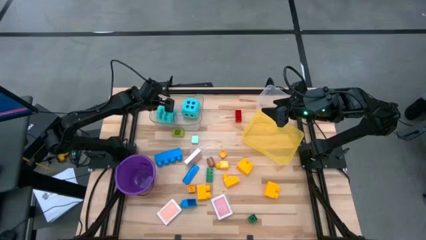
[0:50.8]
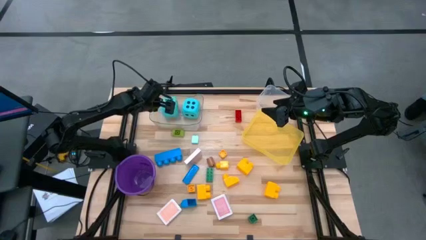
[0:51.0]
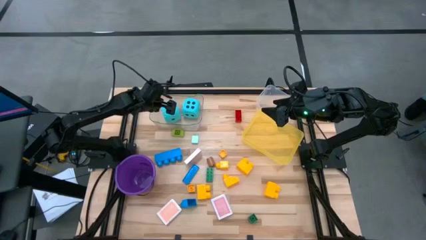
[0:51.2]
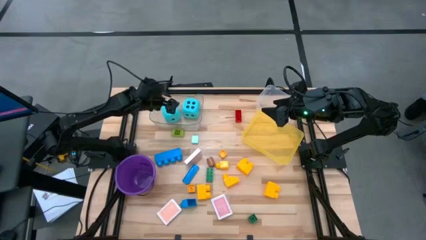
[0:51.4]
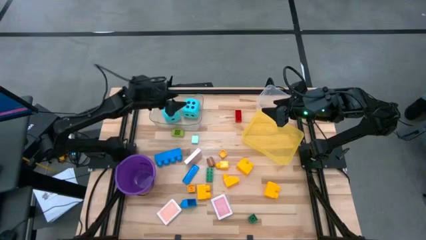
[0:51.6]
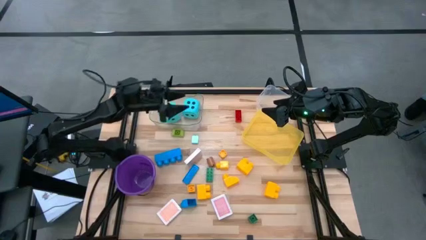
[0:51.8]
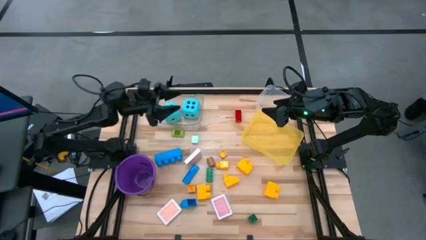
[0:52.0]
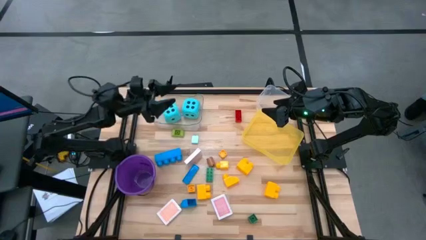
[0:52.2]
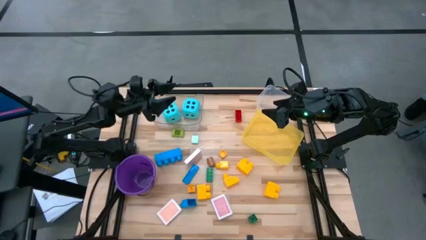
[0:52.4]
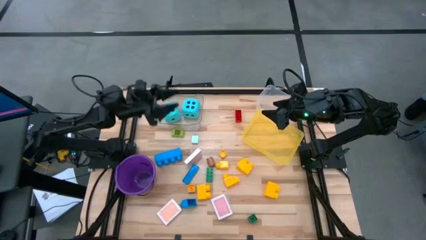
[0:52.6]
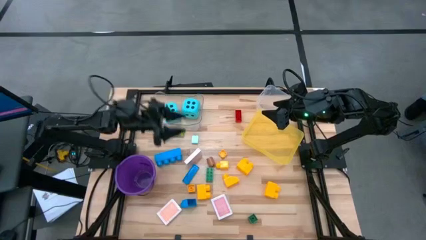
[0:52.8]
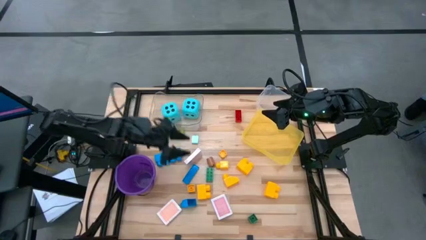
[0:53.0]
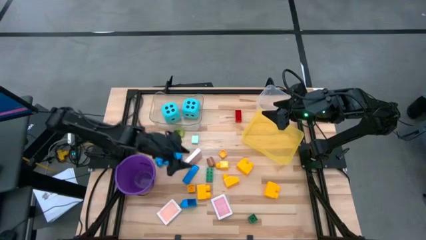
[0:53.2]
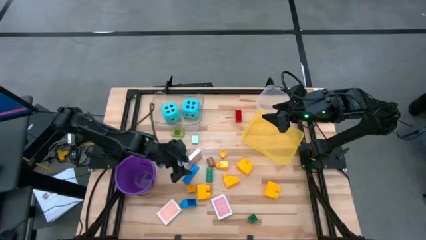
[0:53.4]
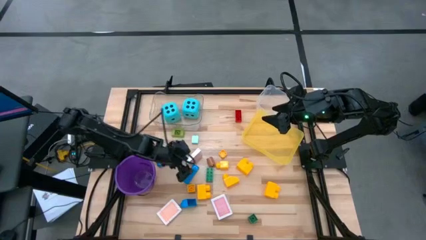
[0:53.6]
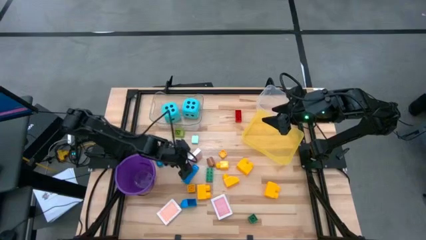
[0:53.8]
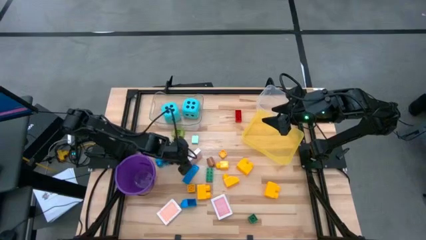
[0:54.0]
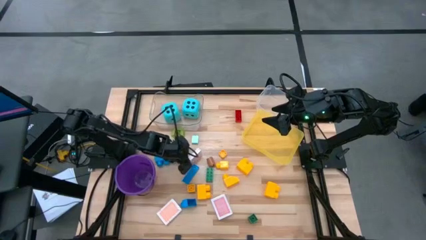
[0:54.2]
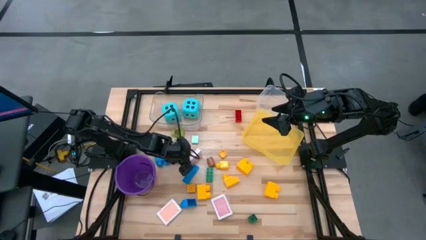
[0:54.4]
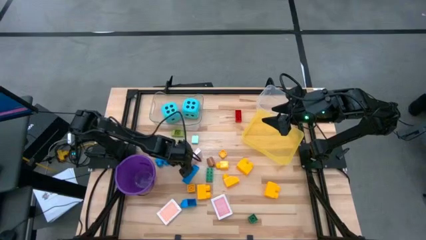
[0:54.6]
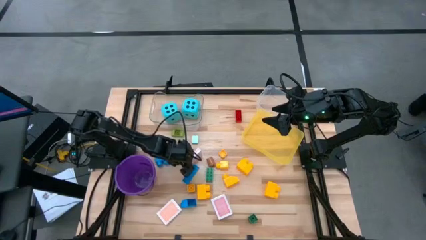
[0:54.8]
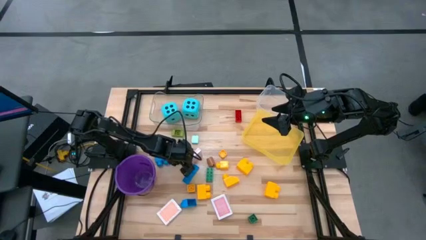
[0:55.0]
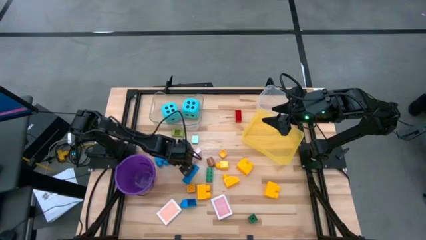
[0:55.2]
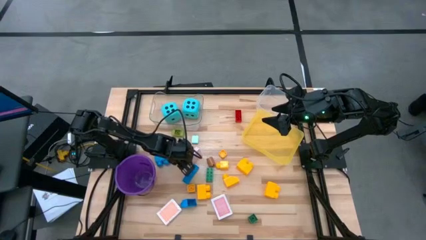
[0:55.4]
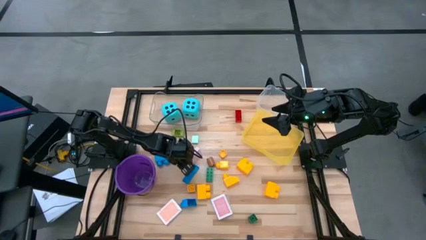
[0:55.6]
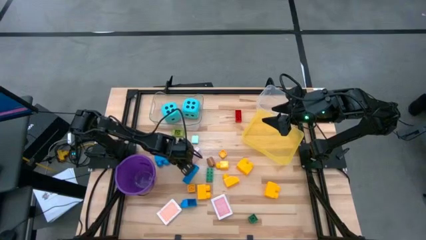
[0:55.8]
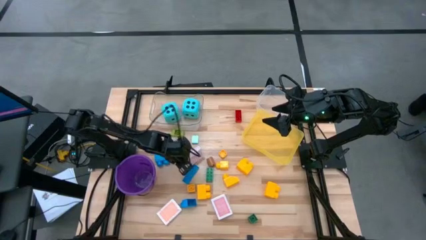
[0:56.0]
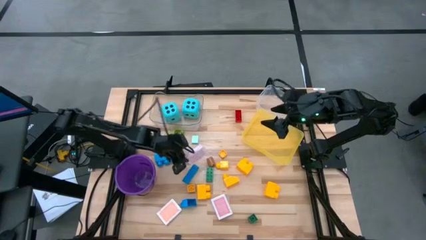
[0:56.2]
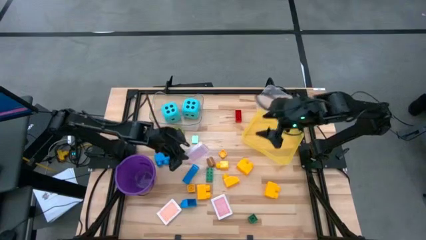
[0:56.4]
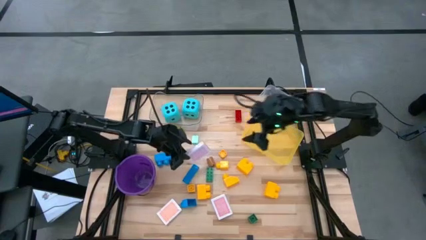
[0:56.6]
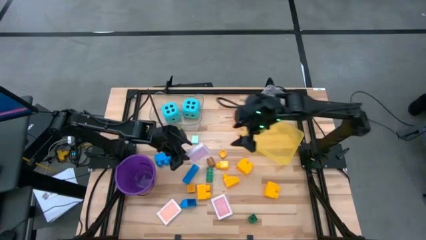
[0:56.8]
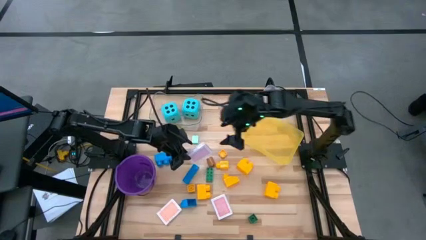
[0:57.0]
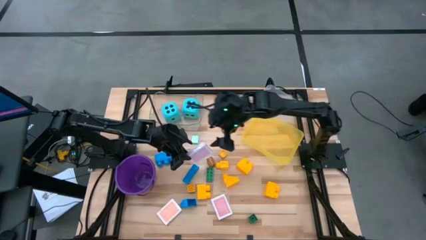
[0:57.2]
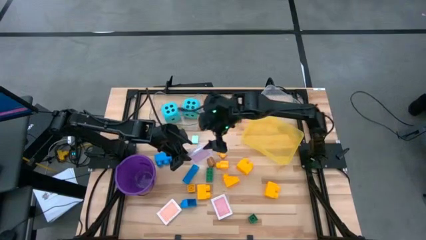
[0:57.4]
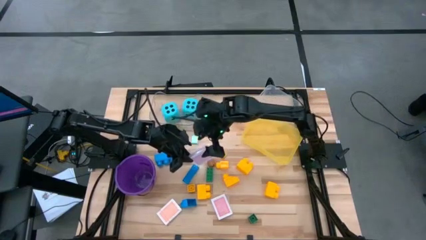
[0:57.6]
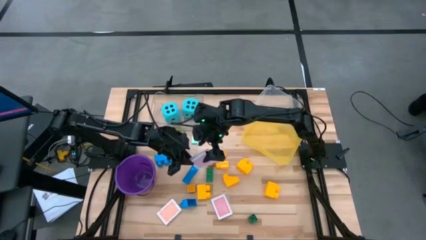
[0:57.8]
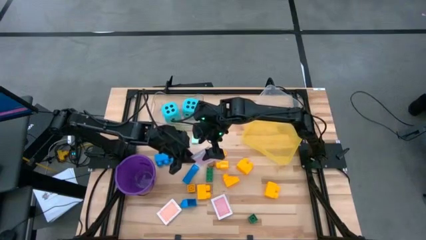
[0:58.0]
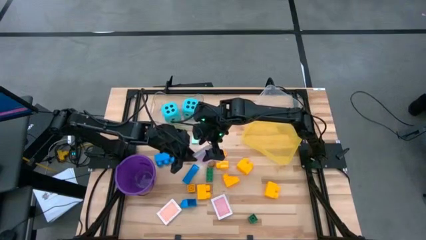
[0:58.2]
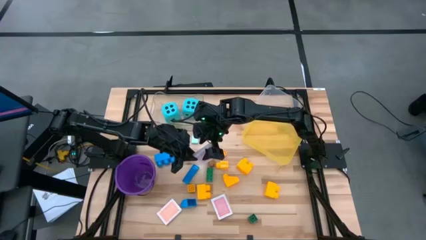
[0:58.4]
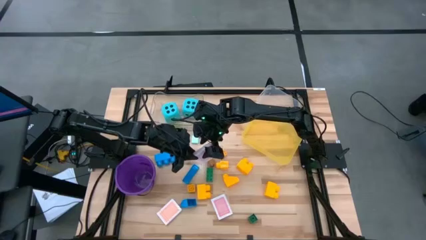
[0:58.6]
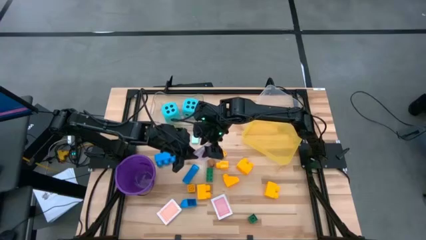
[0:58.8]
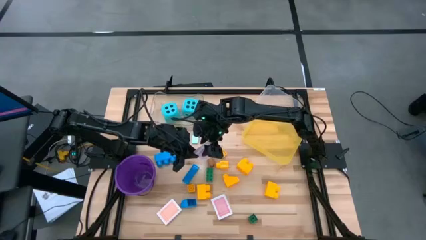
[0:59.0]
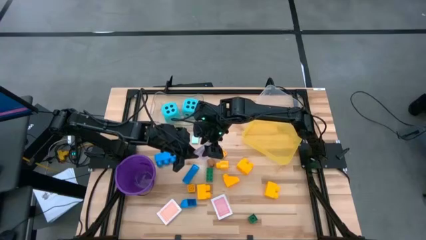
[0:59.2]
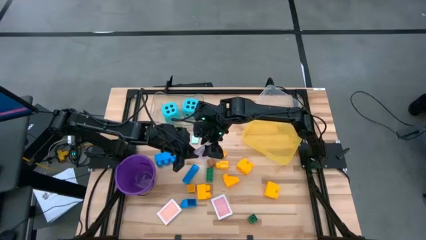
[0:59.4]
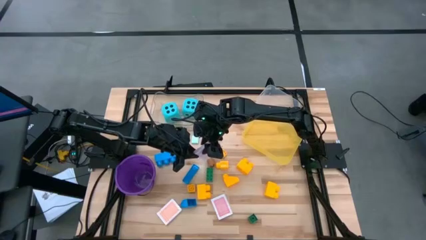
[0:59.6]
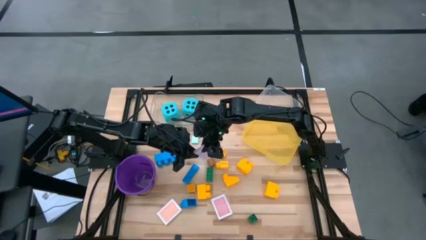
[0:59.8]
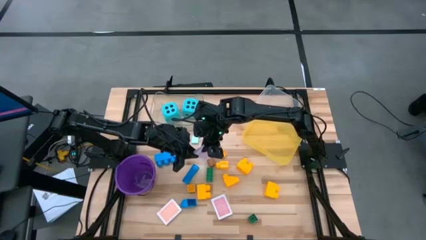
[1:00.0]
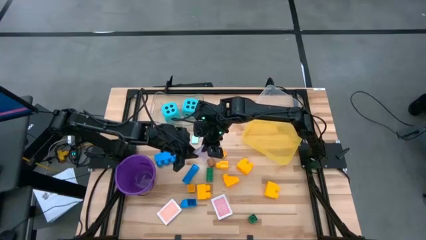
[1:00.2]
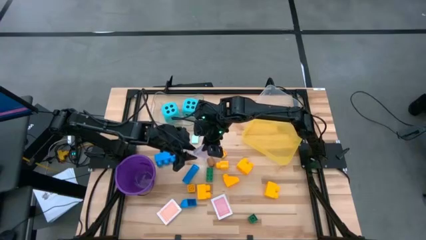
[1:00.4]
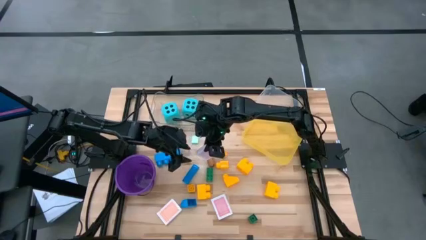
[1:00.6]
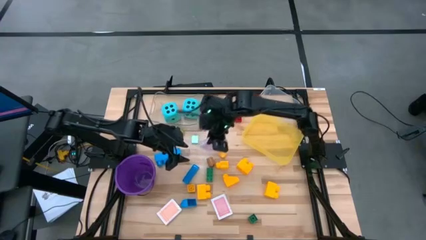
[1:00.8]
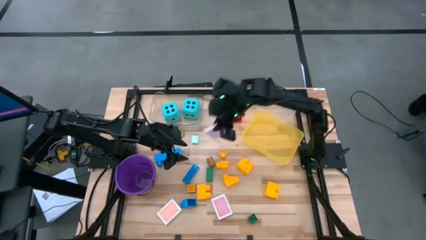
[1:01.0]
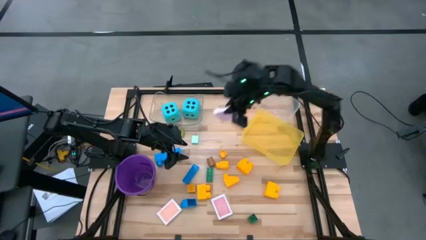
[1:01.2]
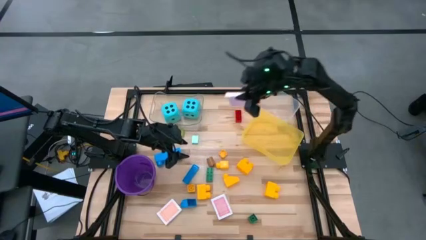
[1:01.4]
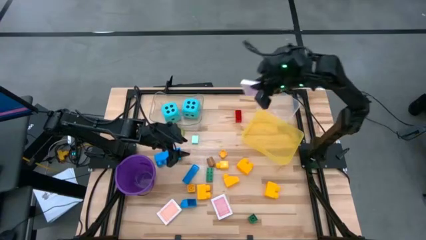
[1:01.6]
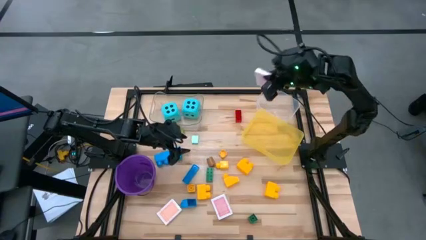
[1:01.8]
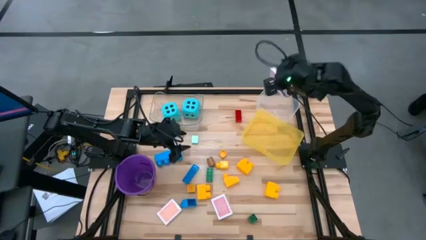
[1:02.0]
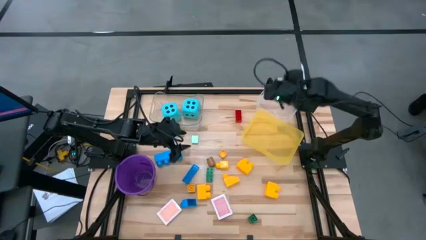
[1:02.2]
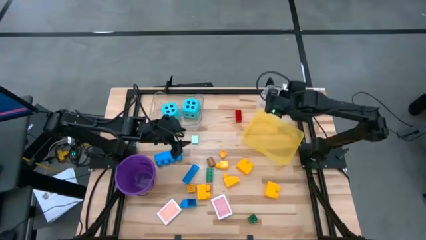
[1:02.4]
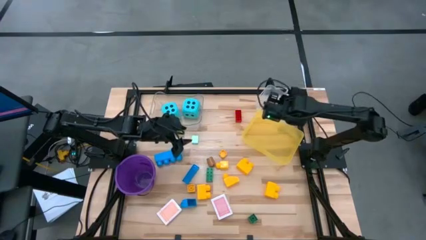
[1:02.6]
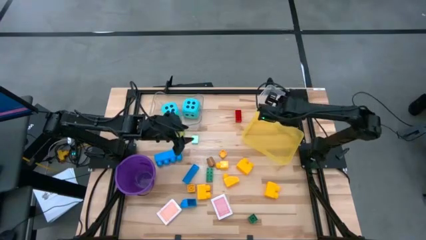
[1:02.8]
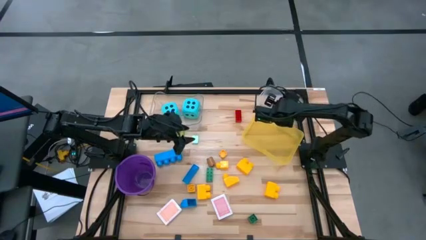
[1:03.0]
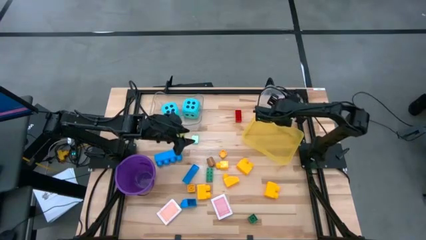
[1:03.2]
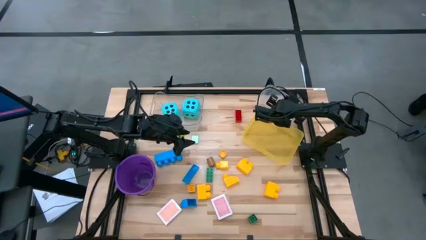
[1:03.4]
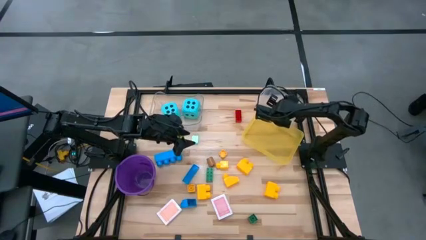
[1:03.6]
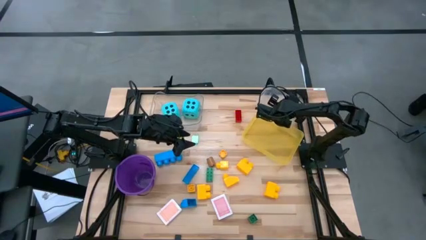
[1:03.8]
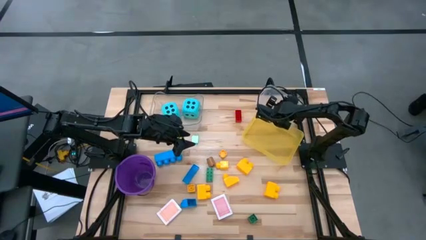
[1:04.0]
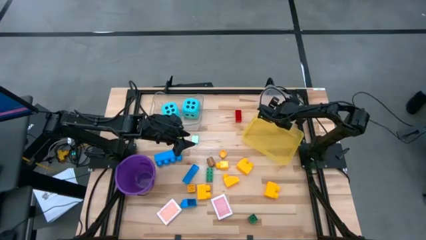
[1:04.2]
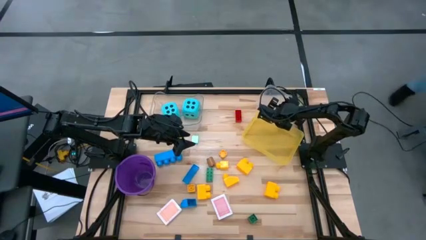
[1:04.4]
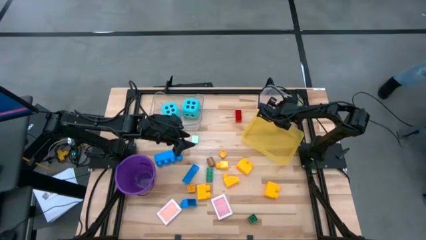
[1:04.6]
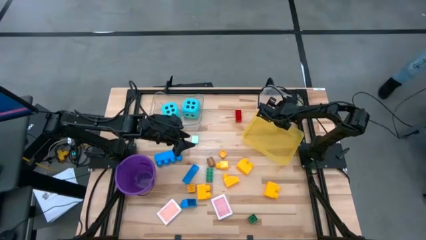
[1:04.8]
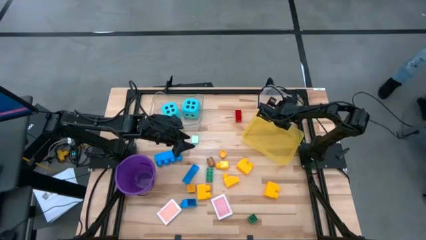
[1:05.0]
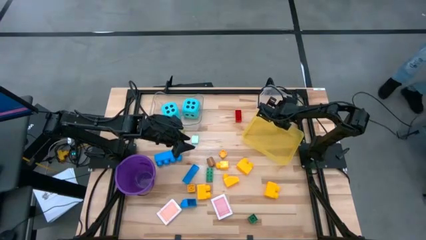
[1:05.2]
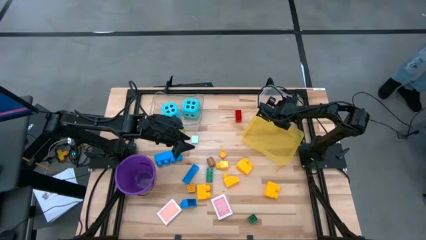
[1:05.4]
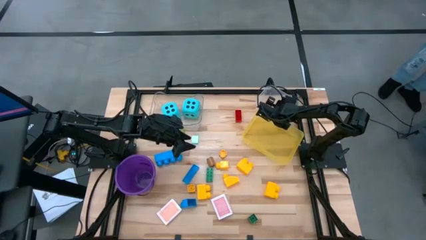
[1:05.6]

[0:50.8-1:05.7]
Task: Pick & Place Toys
Put the red deck of cards into the white bin
